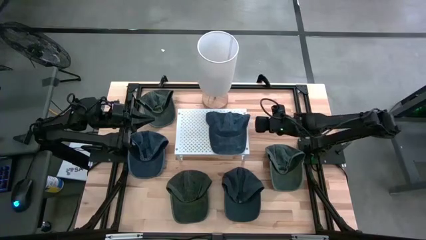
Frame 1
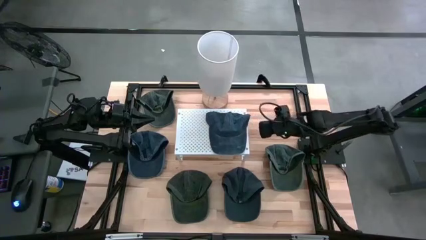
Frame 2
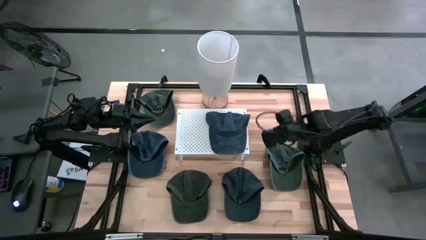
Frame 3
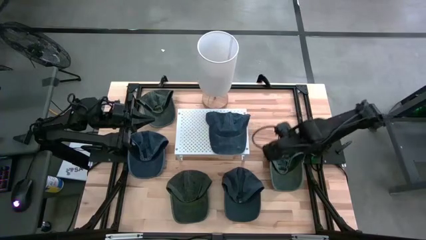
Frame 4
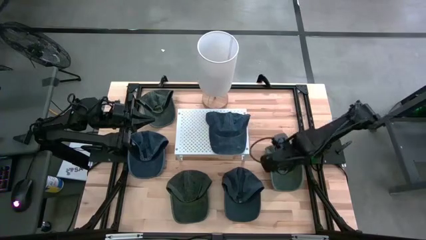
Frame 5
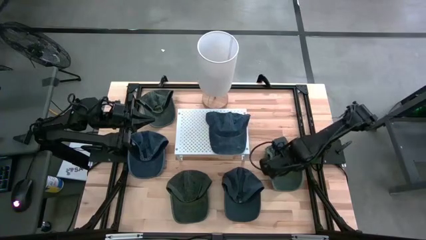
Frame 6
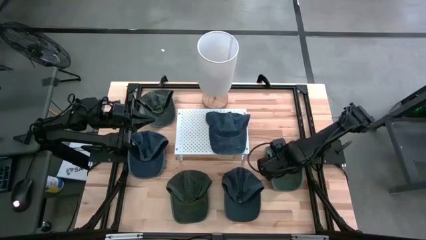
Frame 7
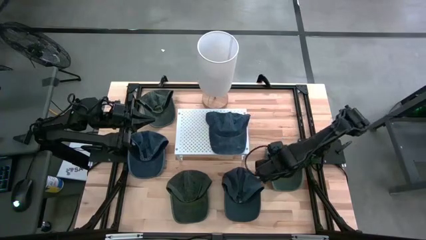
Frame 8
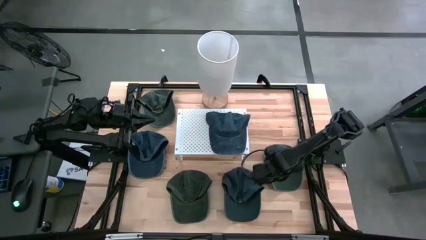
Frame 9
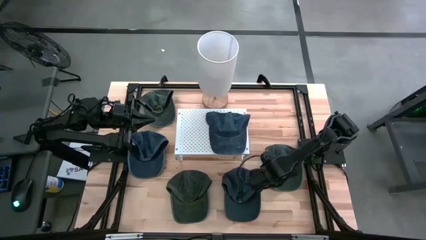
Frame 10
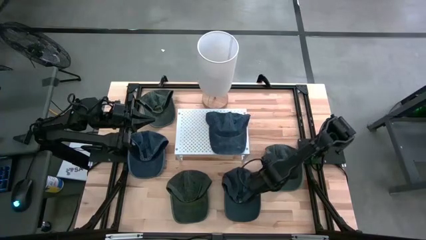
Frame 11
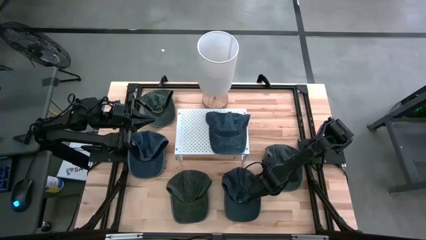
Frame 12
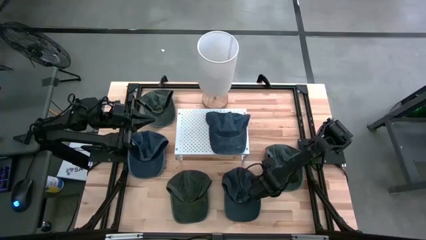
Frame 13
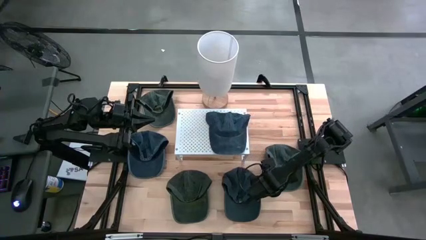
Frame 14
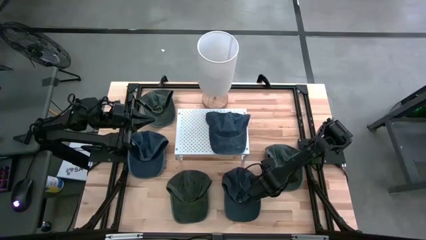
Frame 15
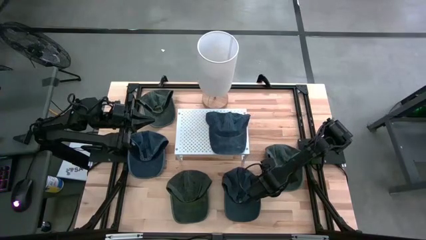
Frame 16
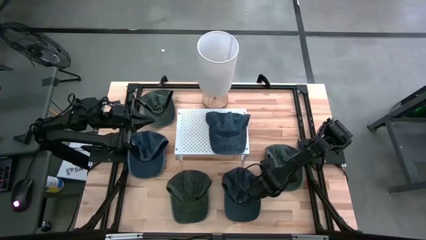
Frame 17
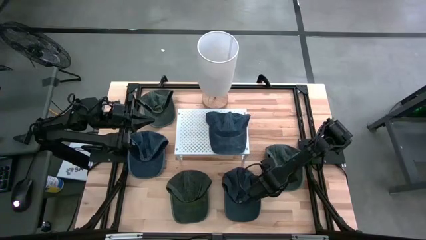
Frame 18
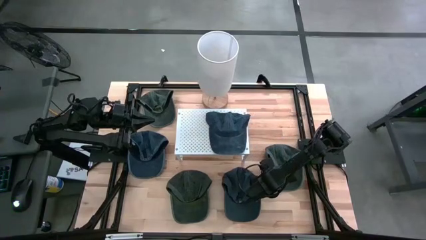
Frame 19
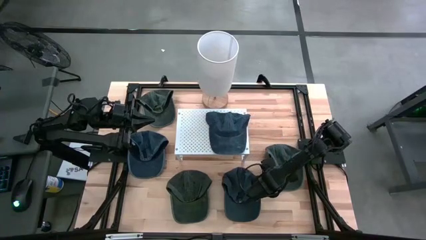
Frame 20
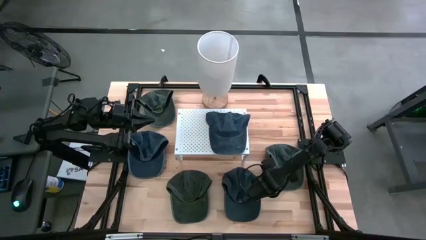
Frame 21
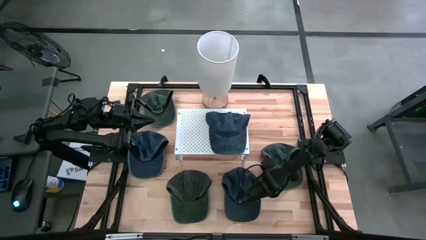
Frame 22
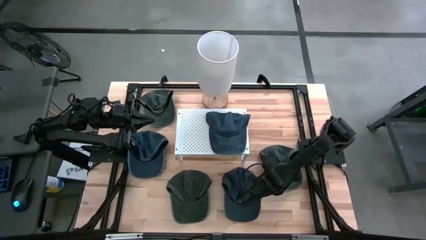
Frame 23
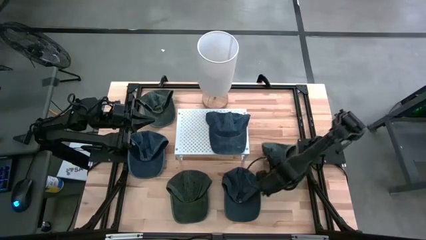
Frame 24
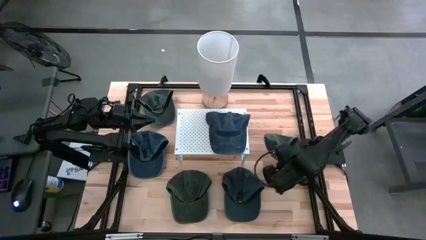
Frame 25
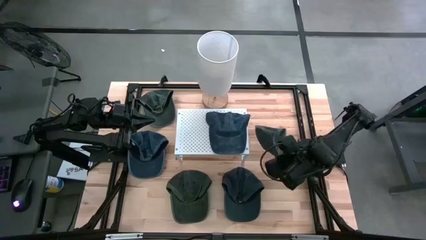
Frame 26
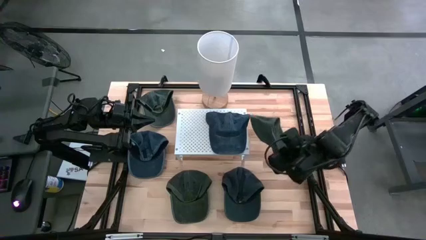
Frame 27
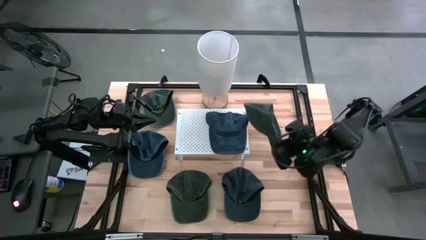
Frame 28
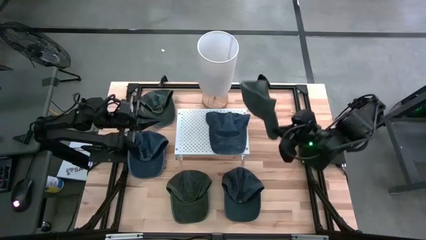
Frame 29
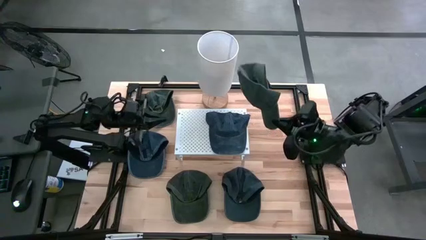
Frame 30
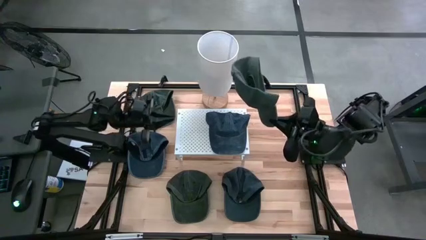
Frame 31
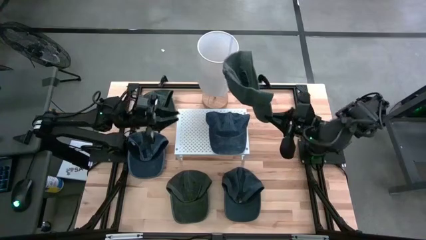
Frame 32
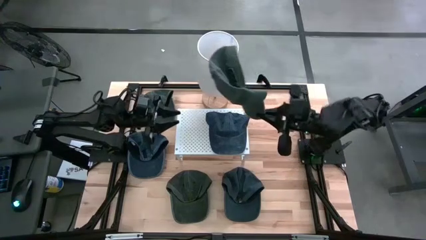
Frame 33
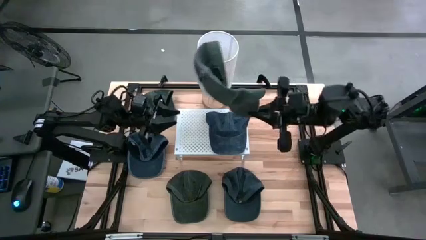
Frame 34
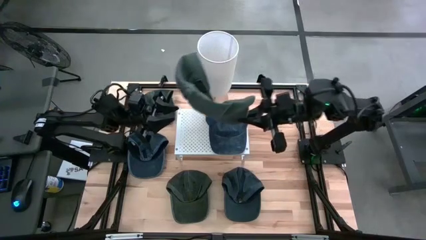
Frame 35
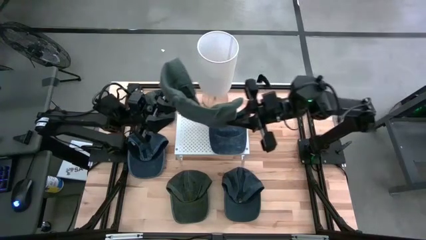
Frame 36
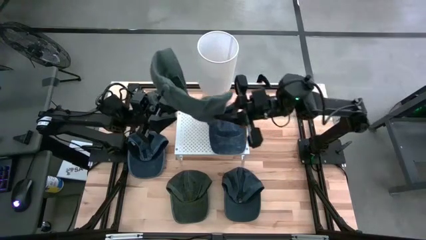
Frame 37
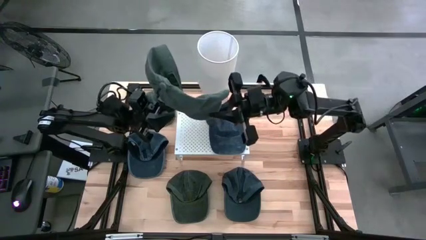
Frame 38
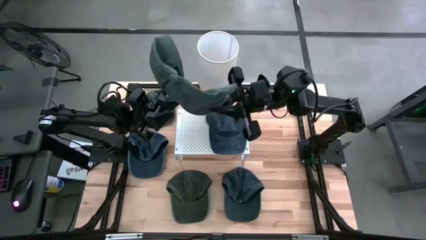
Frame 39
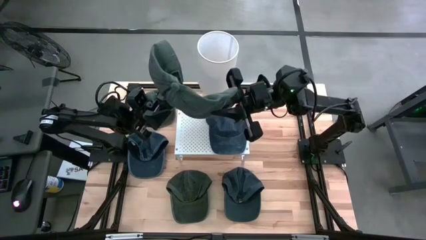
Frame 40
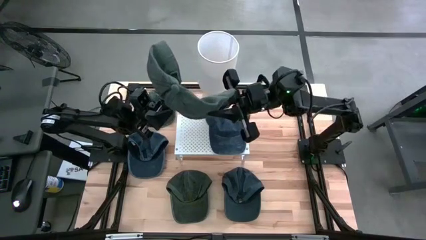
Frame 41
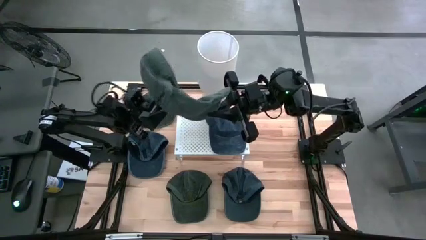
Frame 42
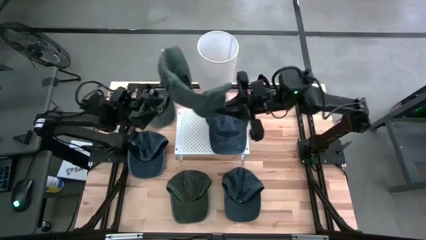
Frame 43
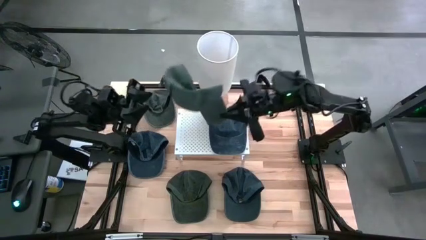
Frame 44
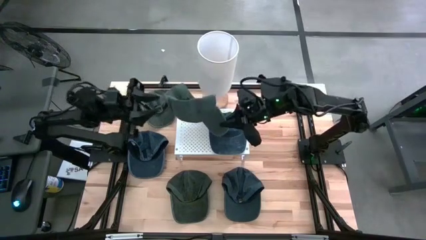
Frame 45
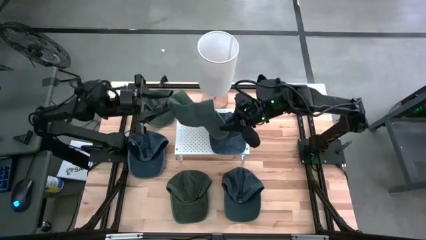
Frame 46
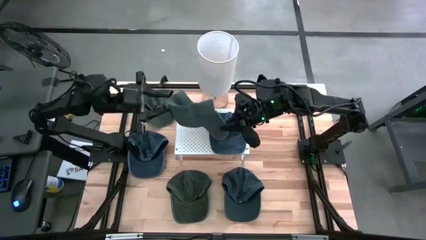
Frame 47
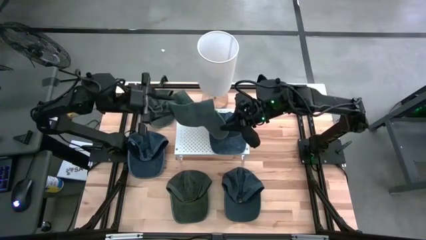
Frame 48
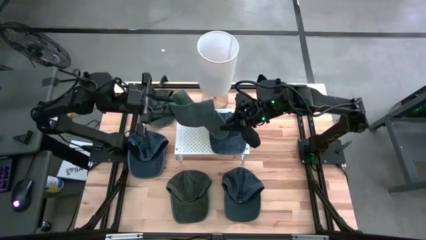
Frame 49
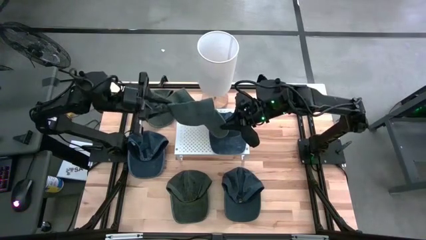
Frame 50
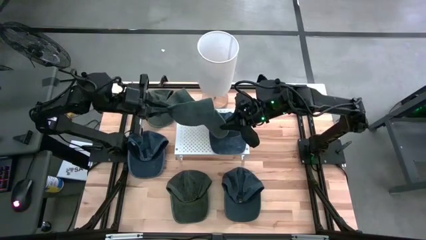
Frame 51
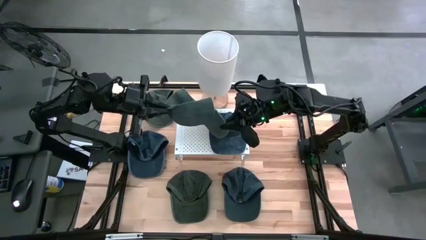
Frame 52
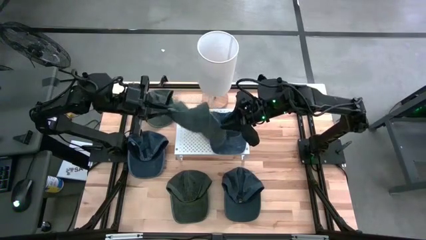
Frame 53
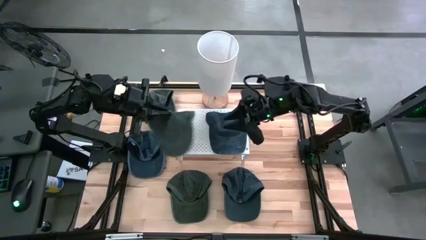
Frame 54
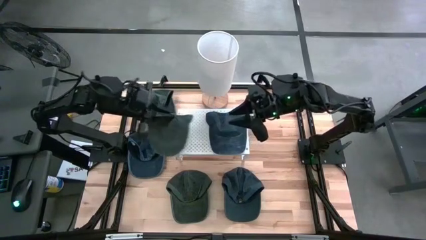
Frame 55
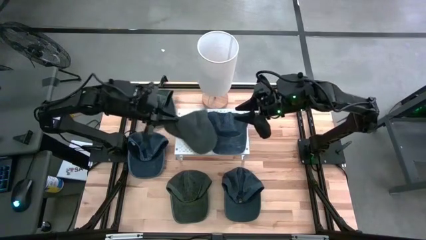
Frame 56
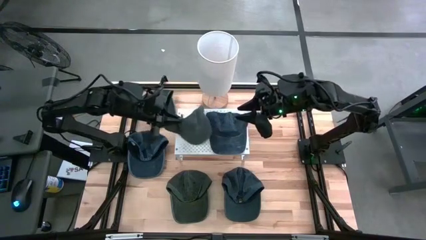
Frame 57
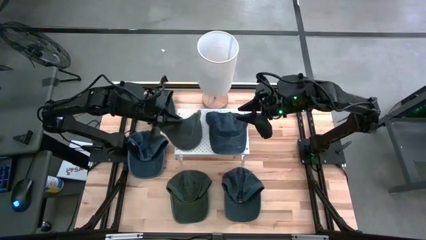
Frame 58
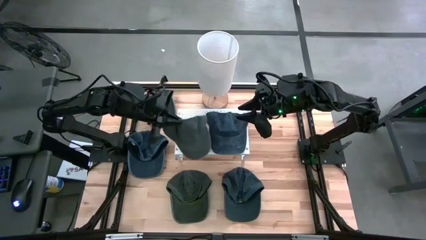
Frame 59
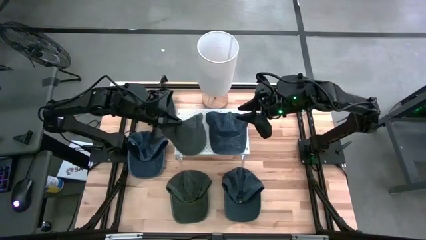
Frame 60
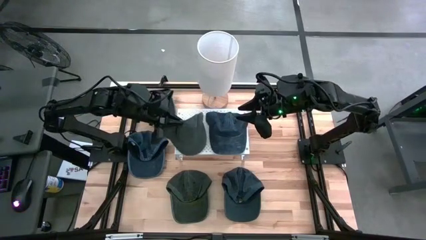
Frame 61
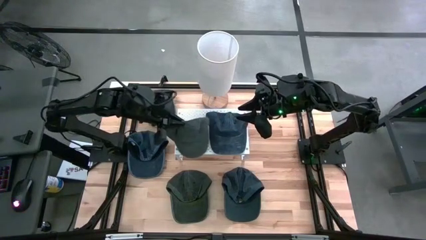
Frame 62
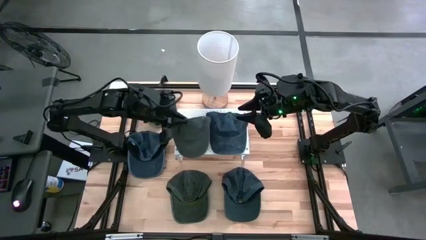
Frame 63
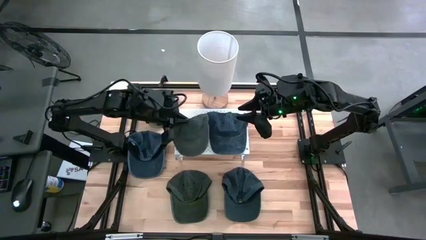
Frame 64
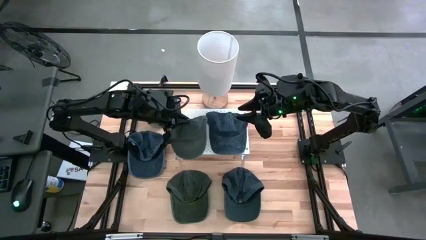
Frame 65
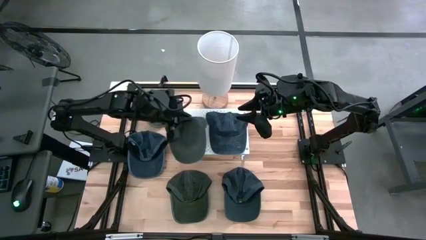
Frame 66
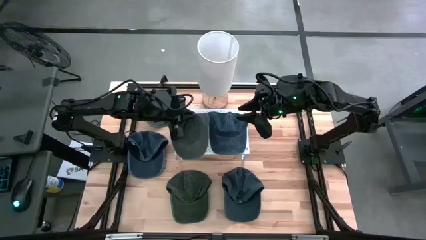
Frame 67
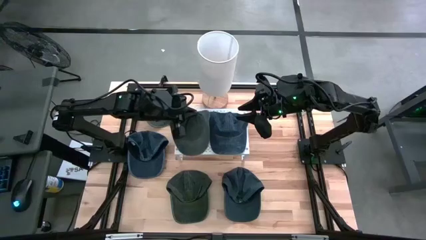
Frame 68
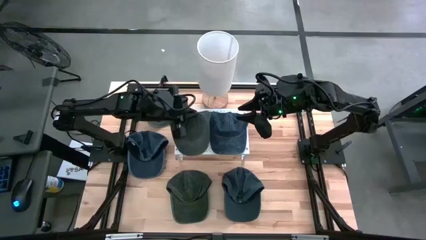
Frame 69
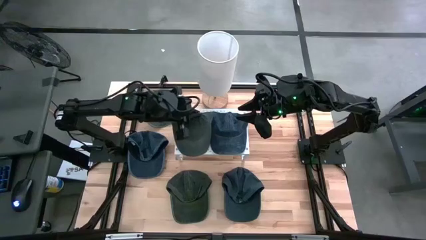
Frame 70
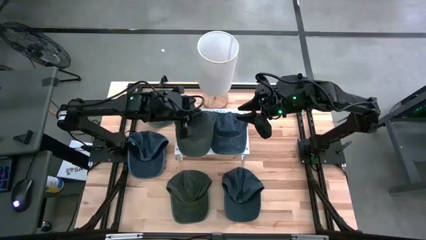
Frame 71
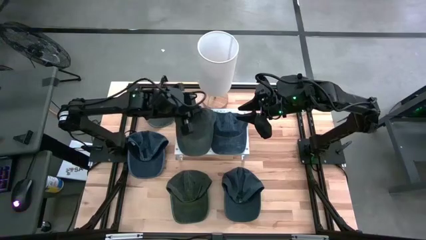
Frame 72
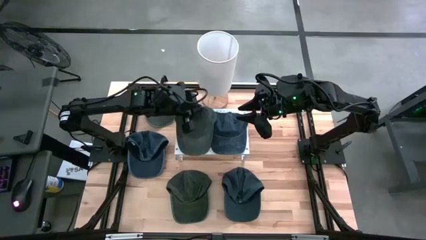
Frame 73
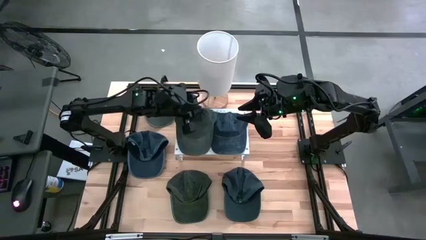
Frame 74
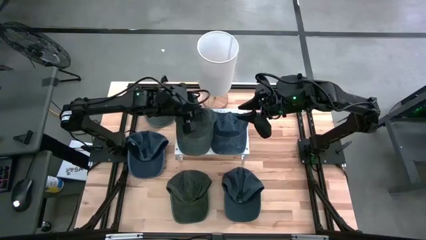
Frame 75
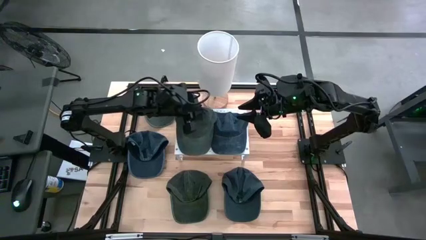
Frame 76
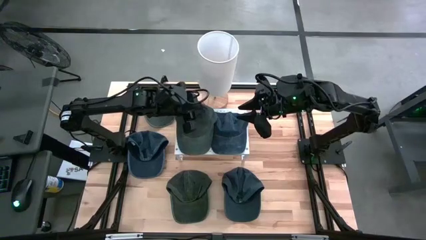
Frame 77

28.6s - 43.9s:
Task: Pick & Place hat
Put the bottom right green cap on the shelf
